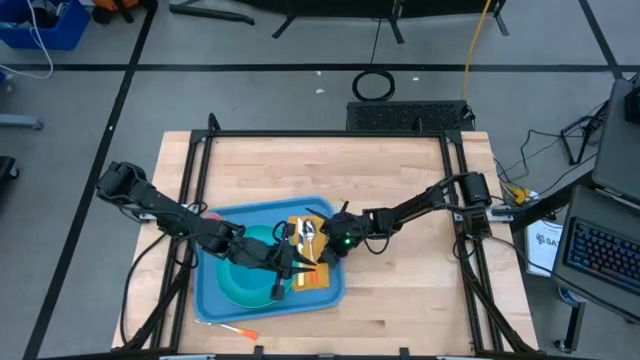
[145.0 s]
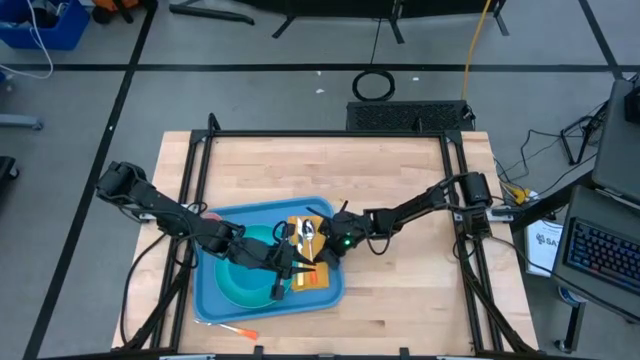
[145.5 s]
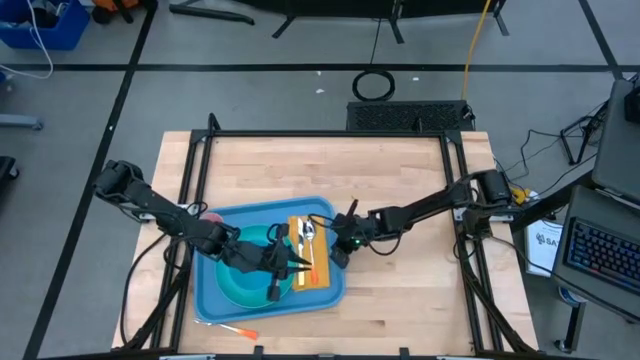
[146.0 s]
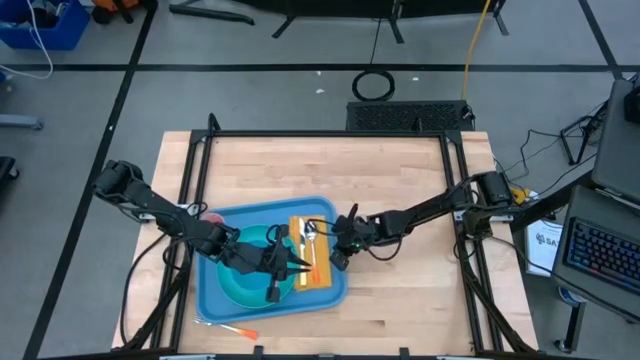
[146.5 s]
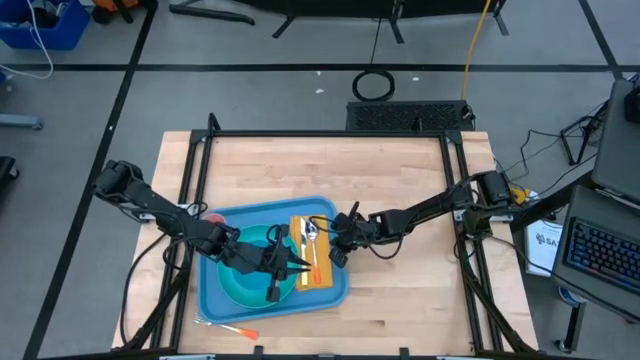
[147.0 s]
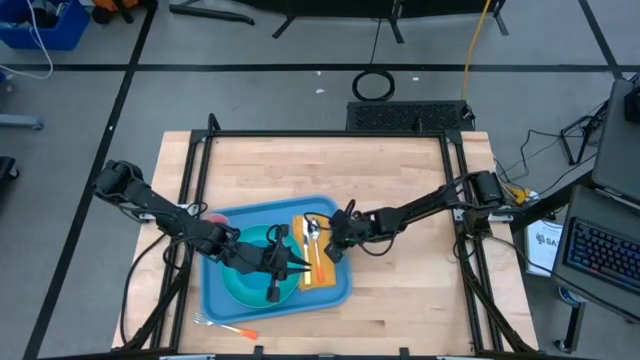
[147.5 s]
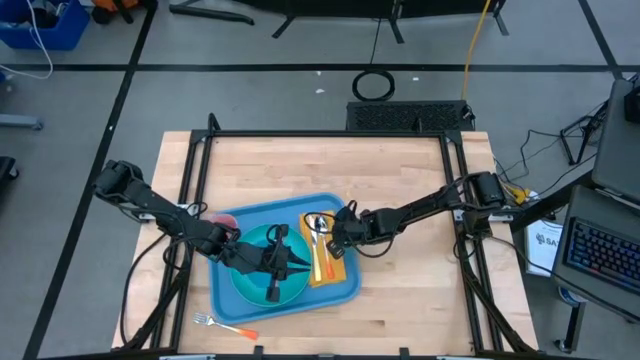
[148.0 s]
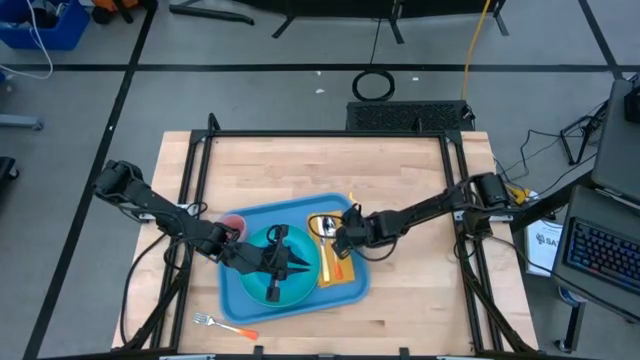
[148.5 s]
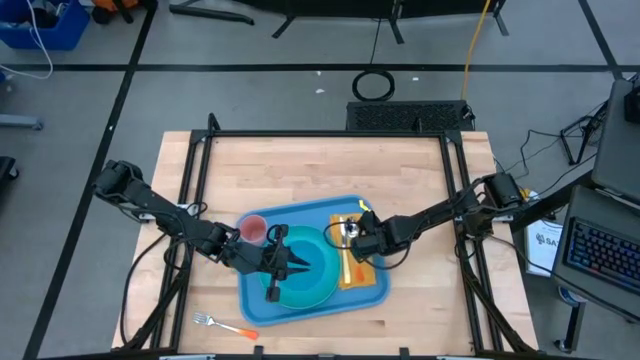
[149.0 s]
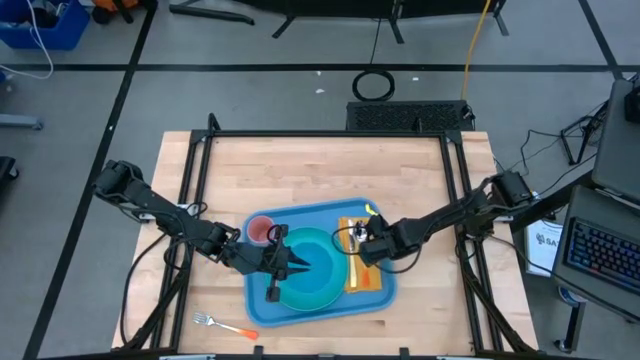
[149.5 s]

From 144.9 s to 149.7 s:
Task: Set up tray
Adjust the blue serving tray

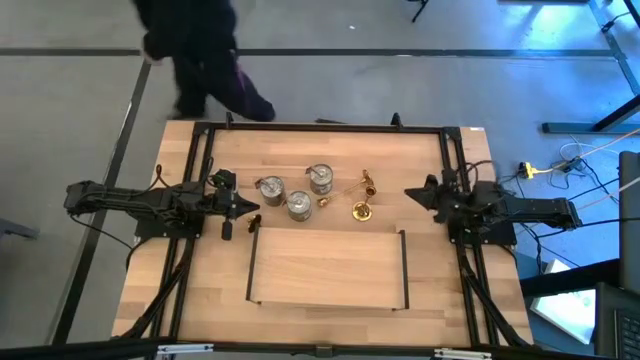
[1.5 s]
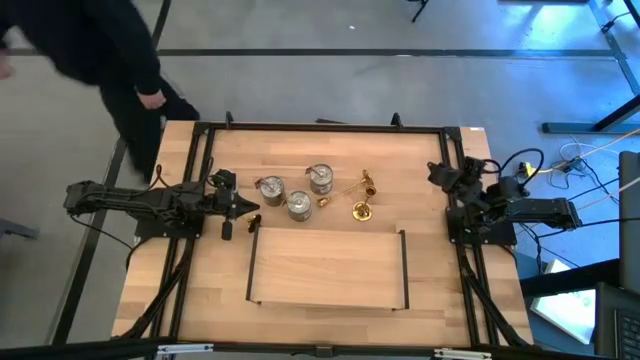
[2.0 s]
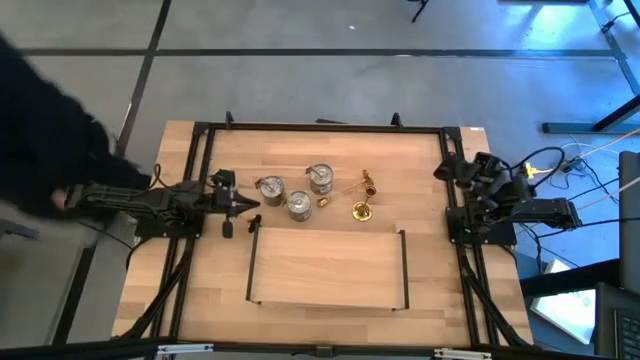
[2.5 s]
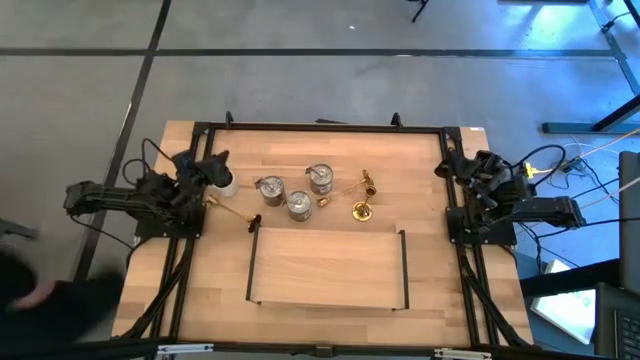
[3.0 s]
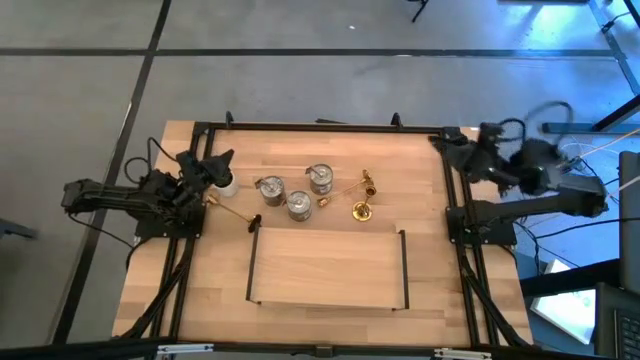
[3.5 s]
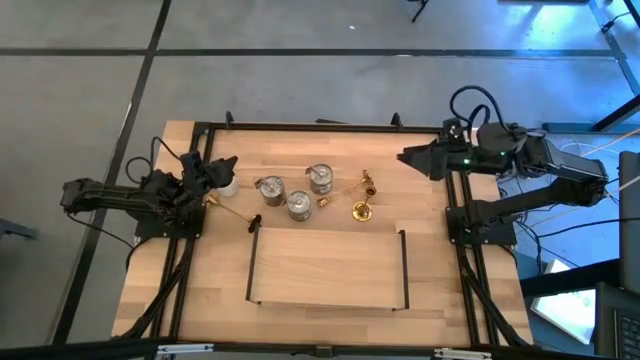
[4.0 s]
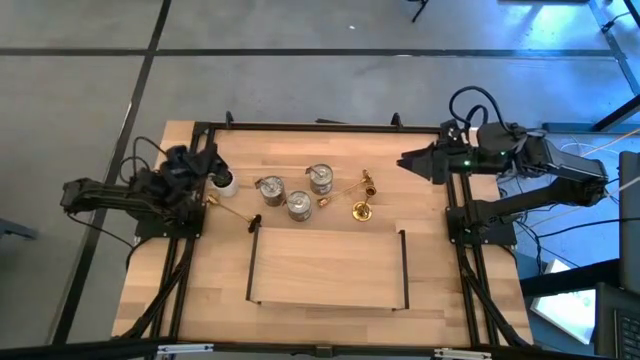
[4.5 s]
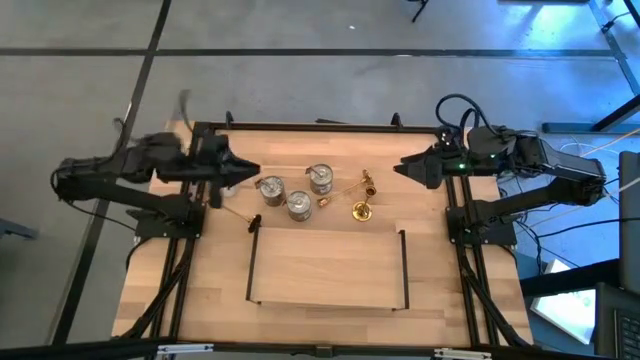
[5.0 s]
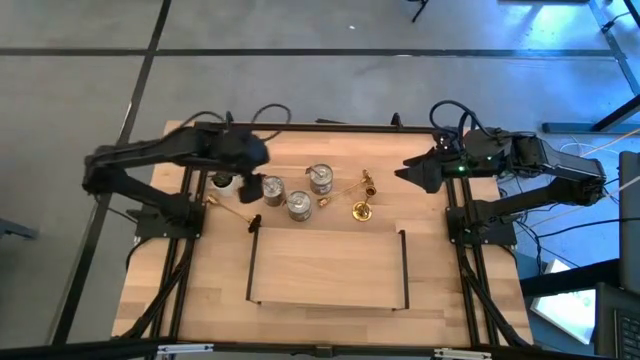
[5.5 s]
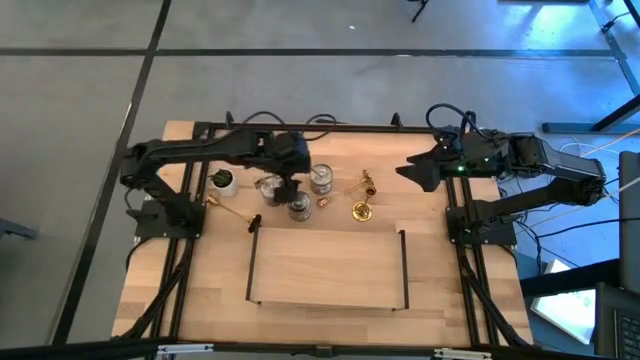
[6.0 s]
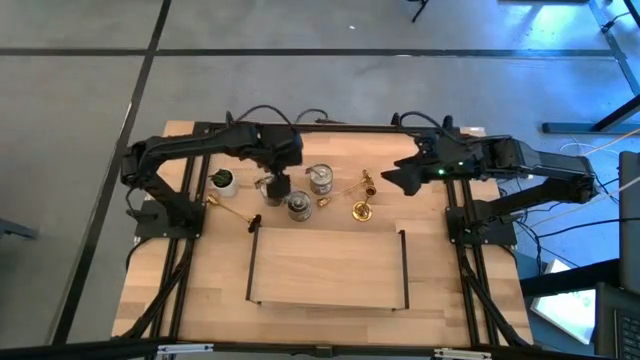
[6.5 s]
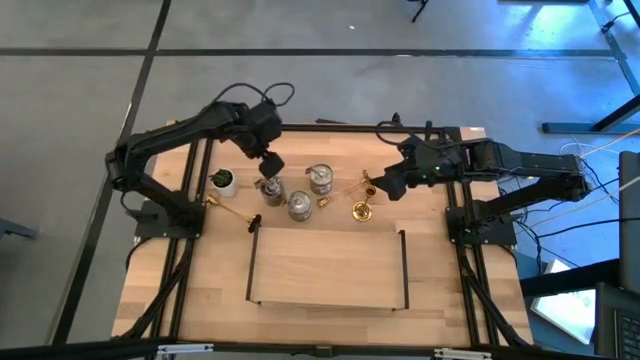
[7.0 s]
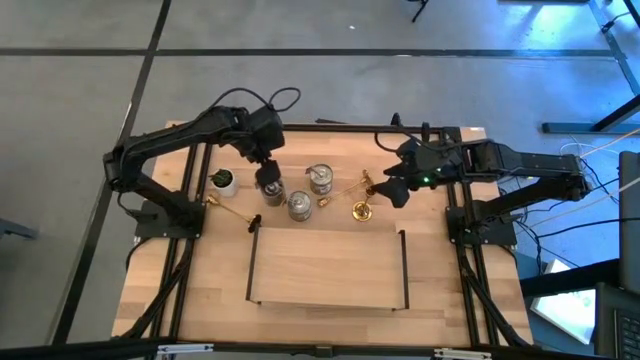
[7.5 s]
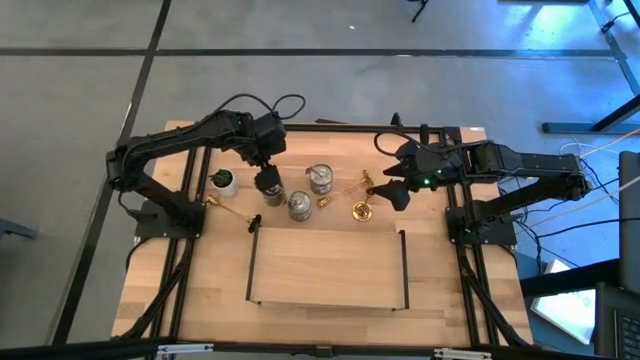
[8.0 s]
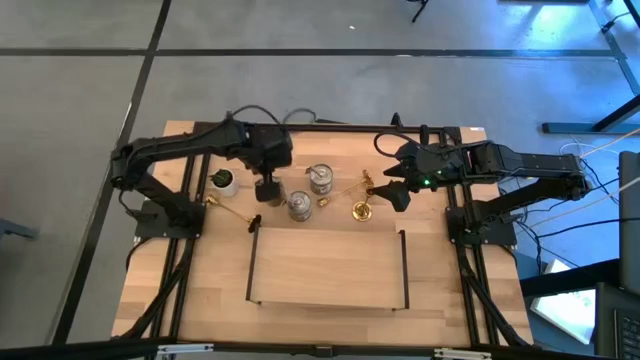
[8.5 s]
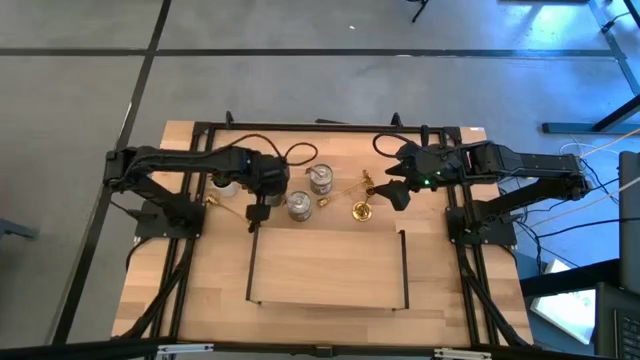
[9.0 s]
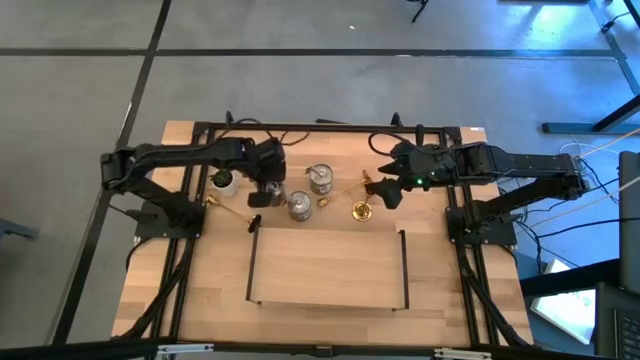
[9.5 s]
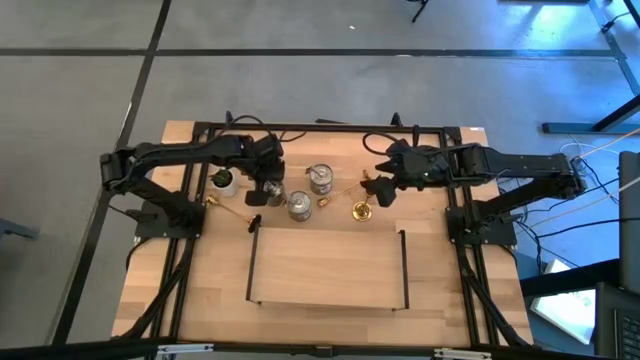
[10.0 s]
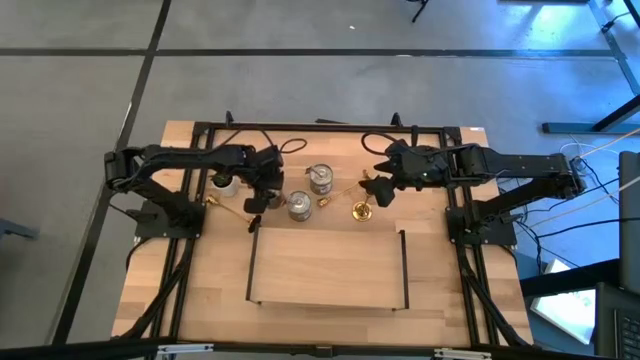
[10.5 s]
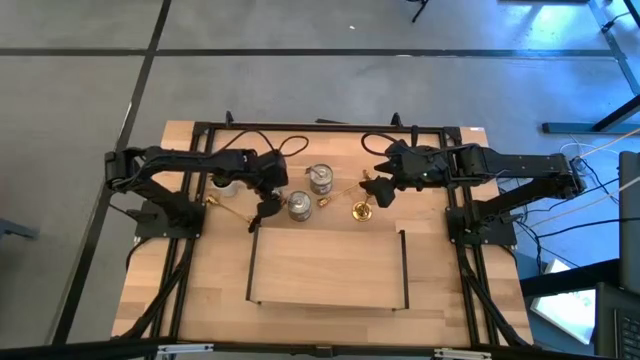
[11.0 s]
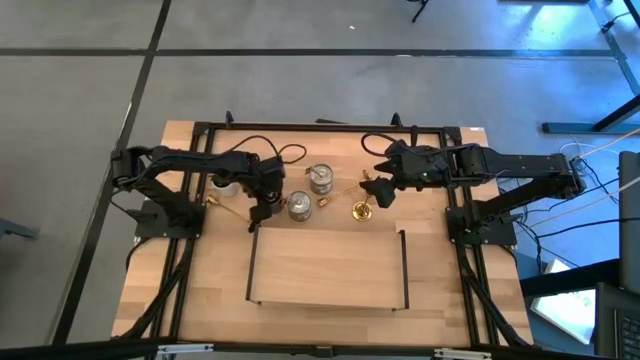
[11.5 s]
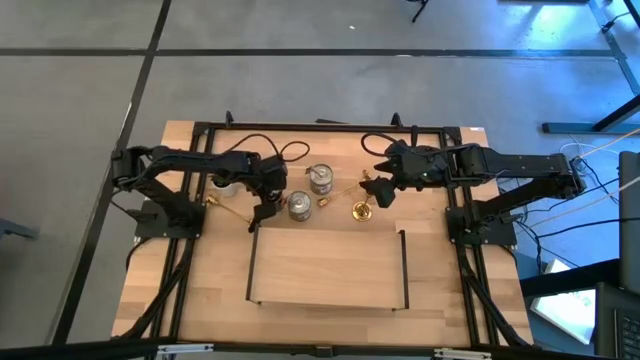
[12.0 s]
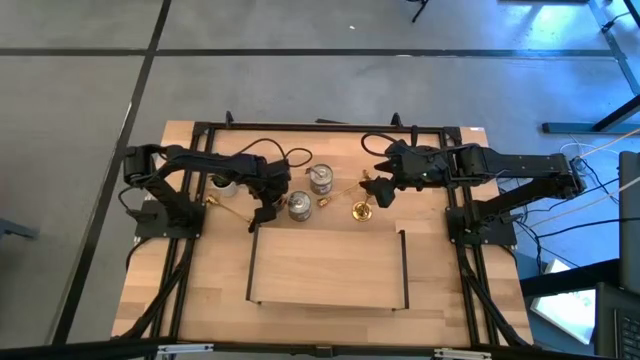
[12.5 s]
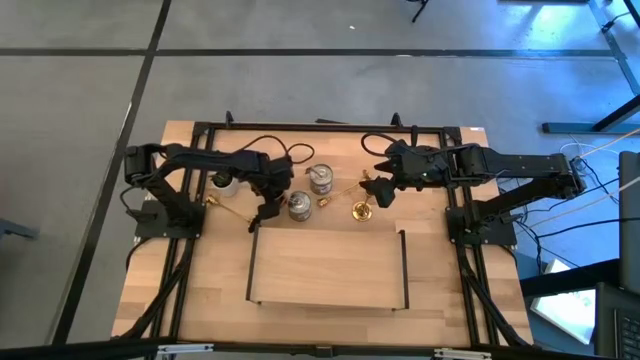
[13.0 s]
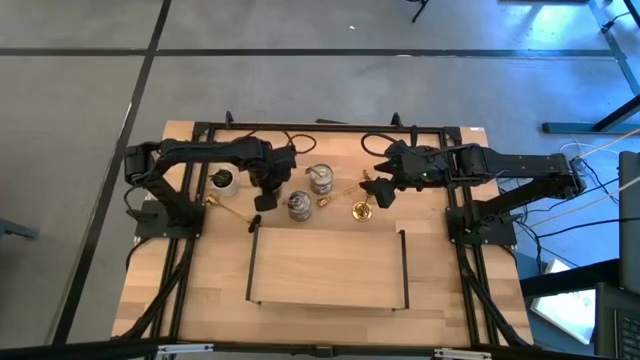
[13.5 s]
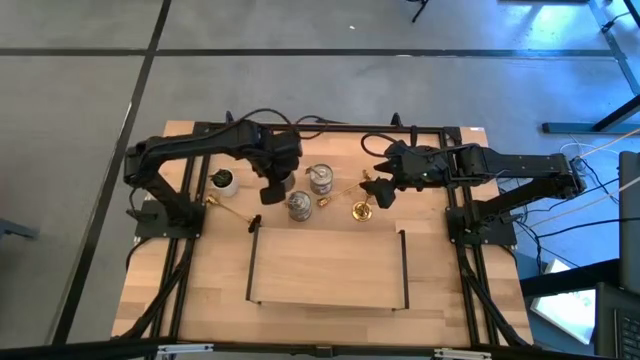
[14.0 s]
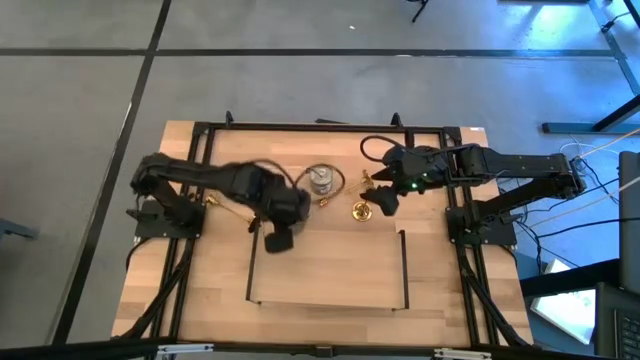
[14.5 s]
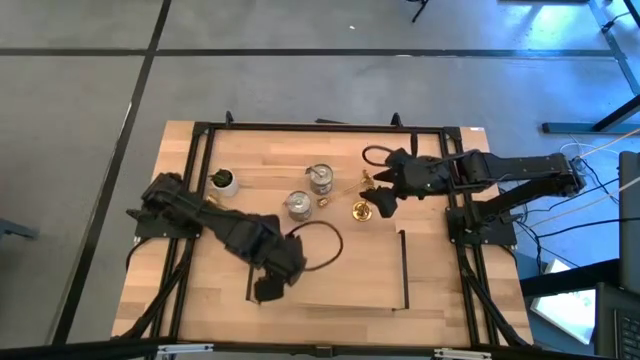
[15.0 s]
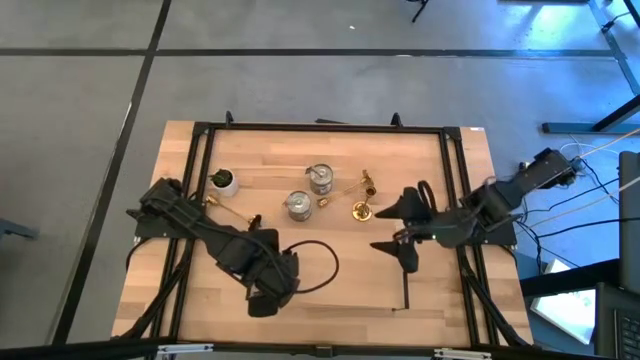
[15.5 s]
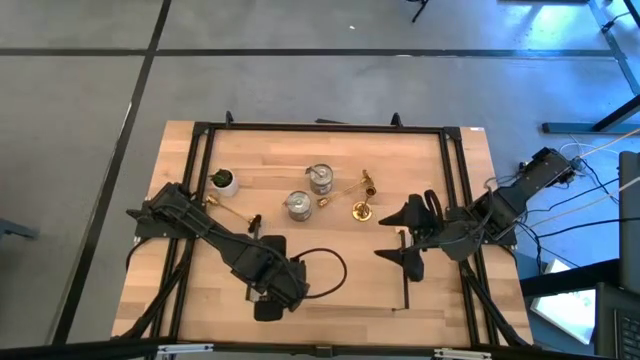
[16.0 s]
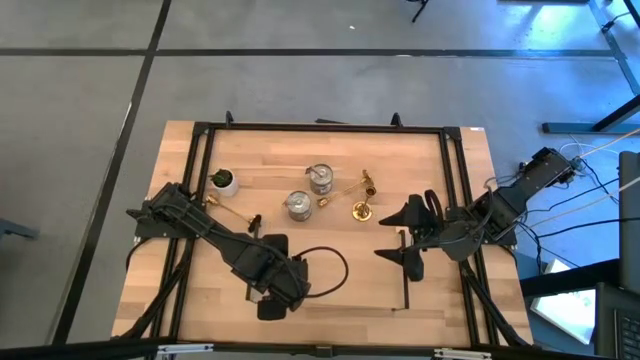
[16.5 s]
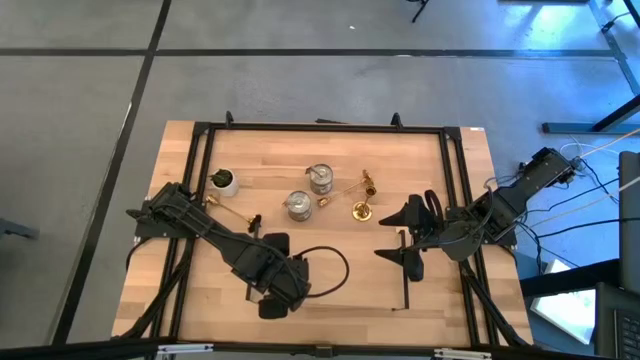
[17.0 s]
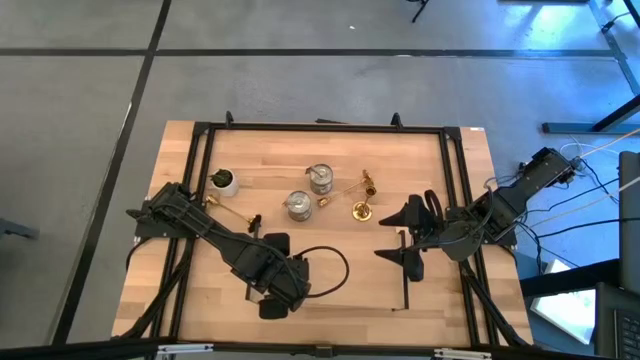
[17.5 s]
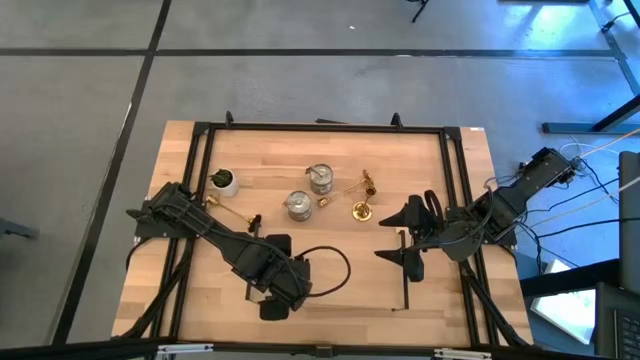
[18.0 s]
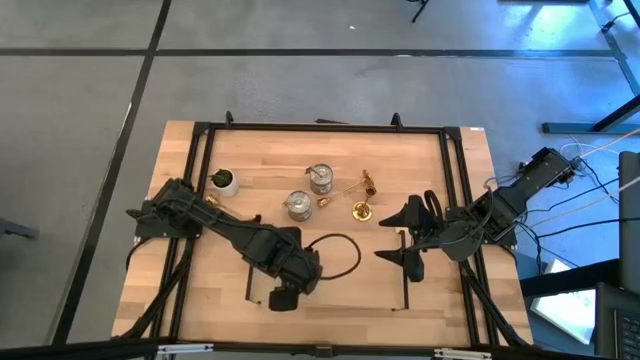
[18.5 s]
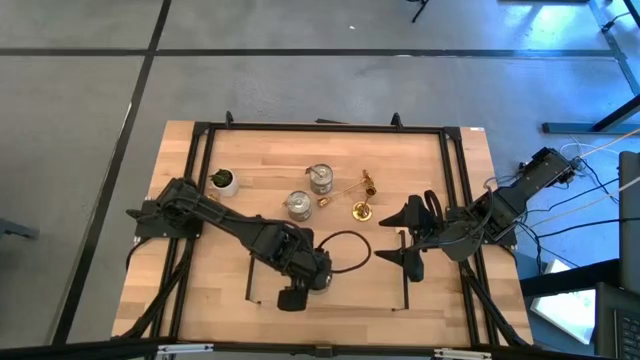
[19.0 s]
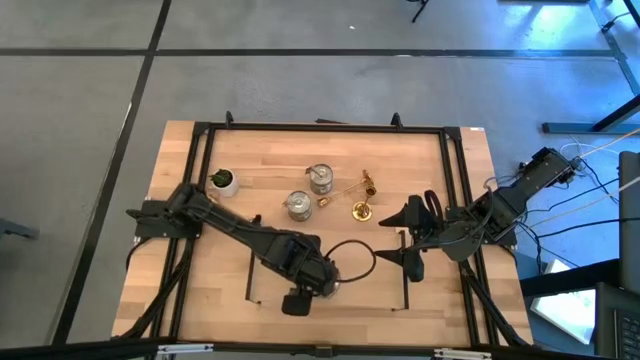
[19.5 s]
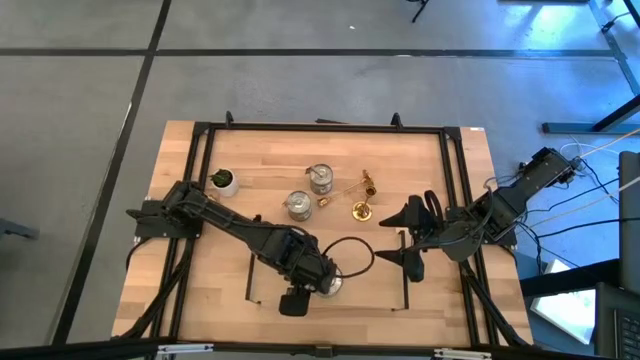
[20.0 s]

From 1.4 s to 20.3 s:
Task: Pick & Place candle stick holders
Put the top left silver scented candle on the shelf
